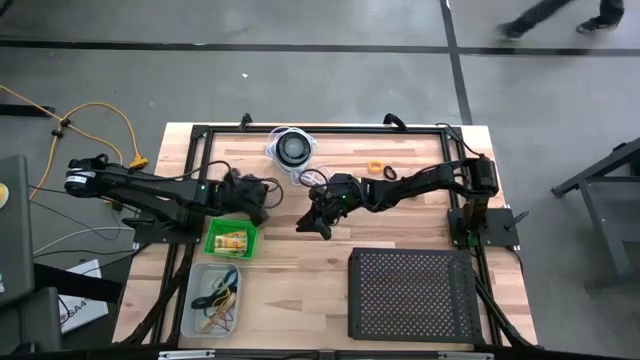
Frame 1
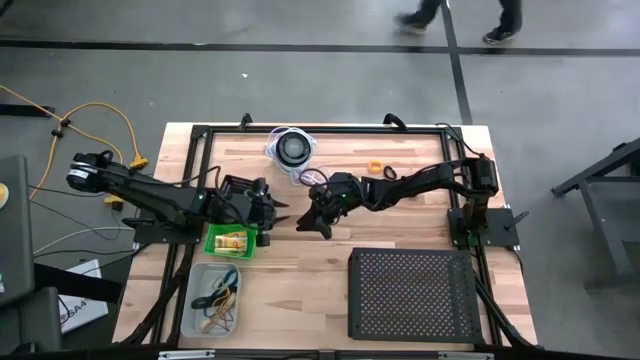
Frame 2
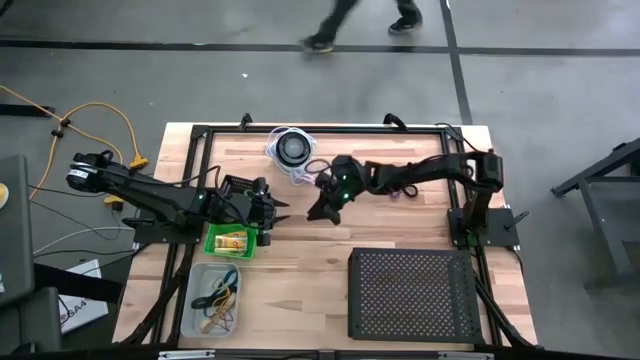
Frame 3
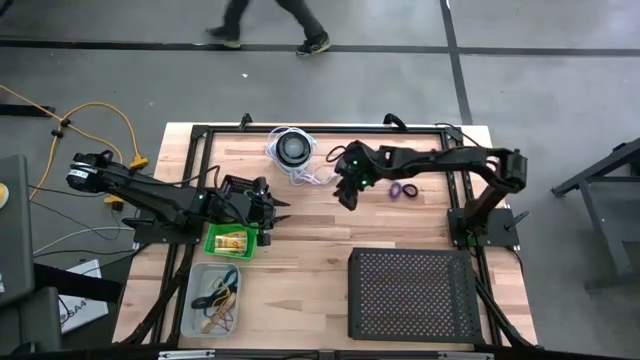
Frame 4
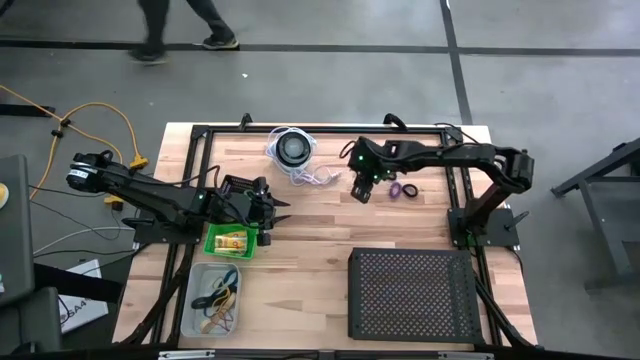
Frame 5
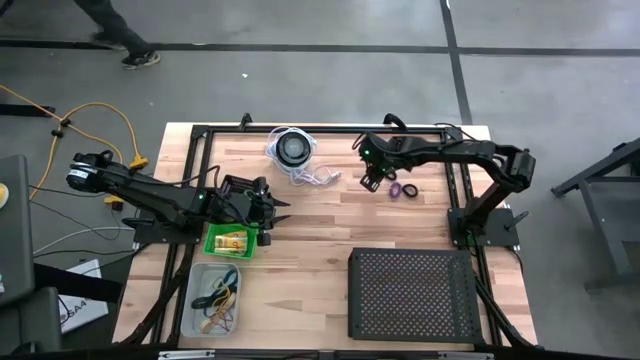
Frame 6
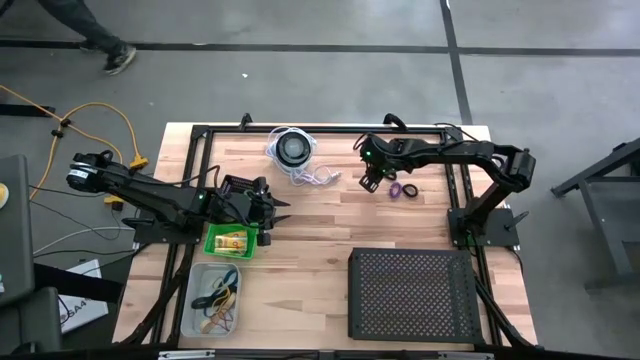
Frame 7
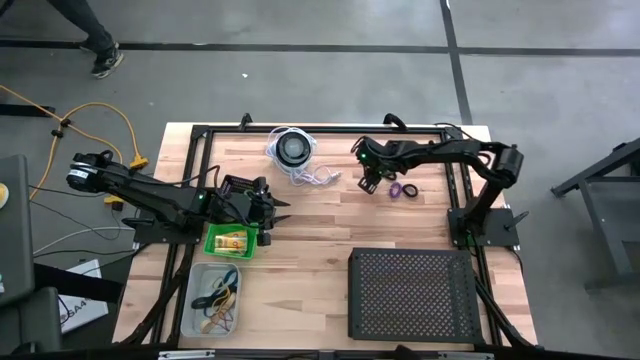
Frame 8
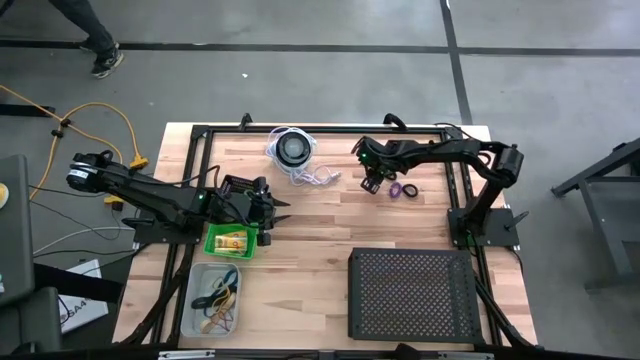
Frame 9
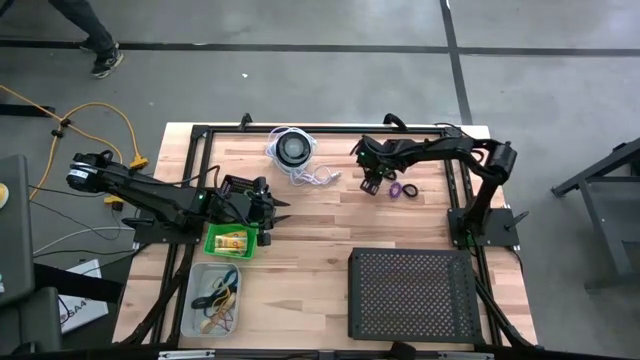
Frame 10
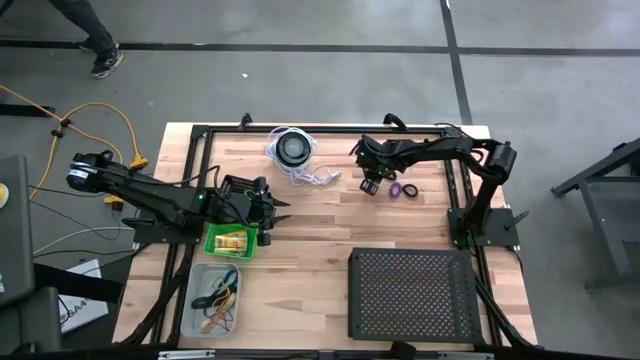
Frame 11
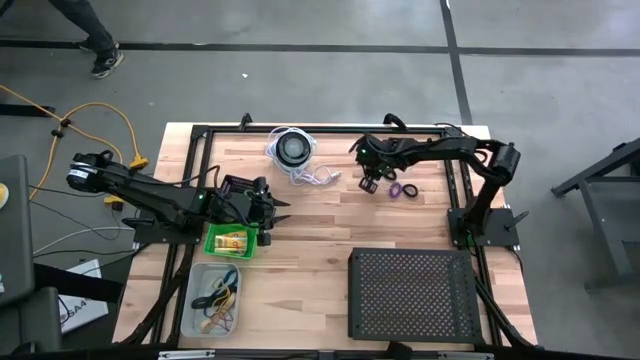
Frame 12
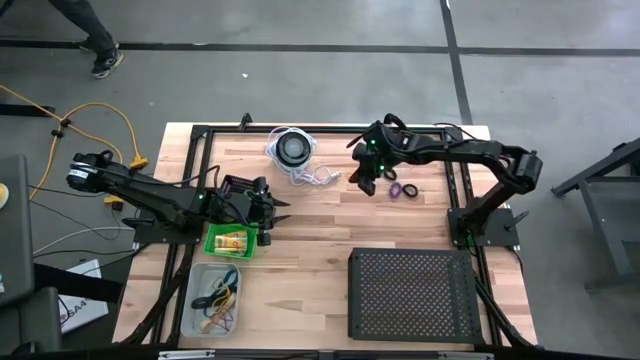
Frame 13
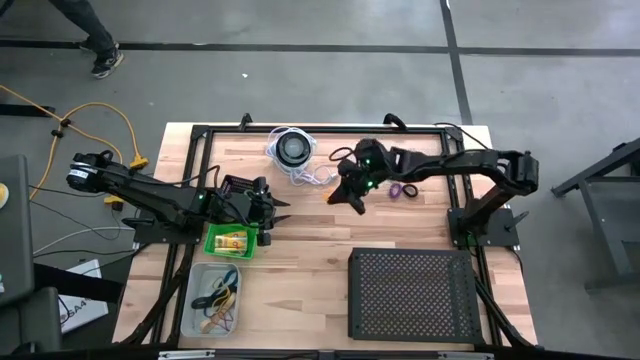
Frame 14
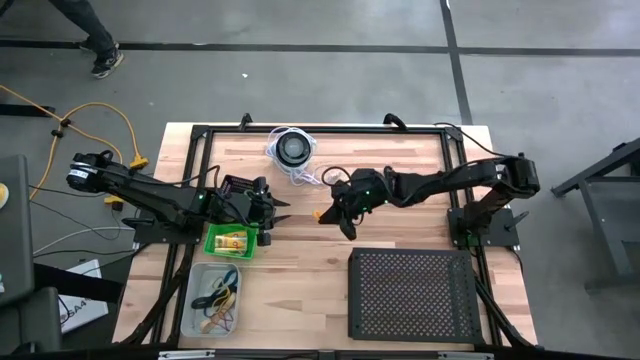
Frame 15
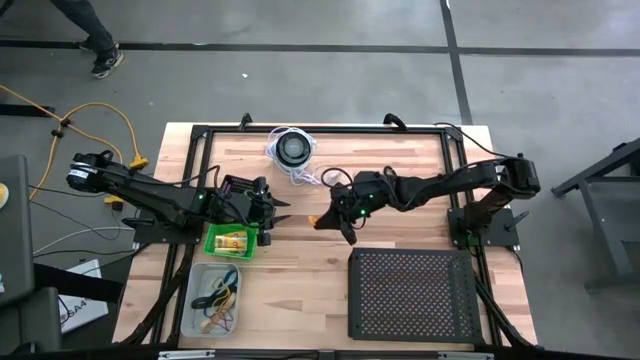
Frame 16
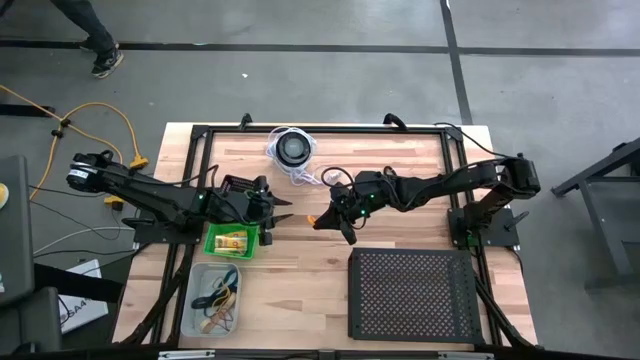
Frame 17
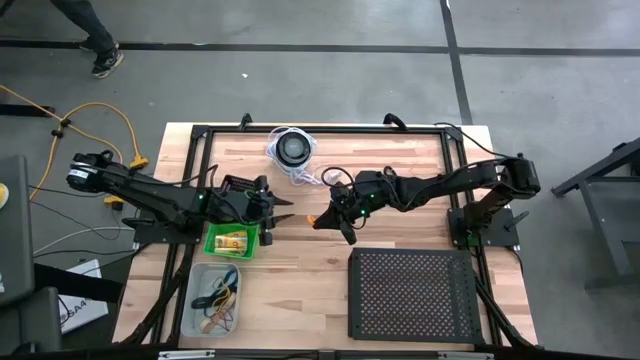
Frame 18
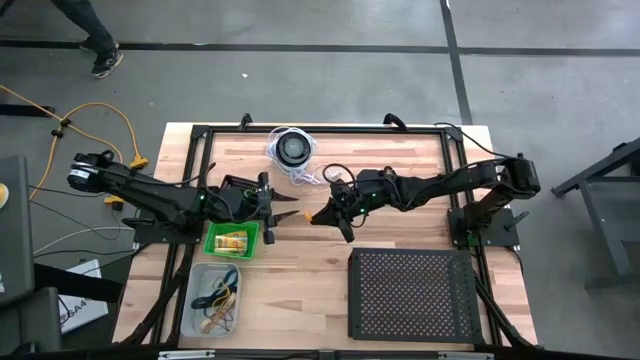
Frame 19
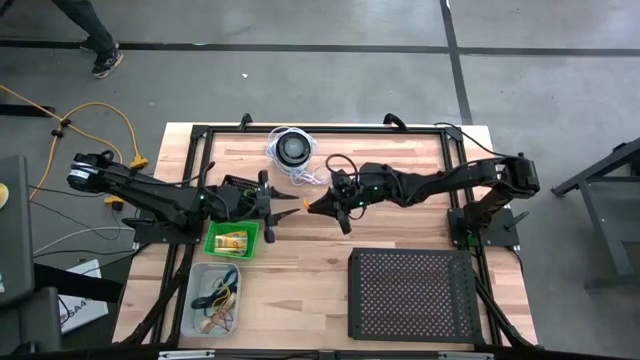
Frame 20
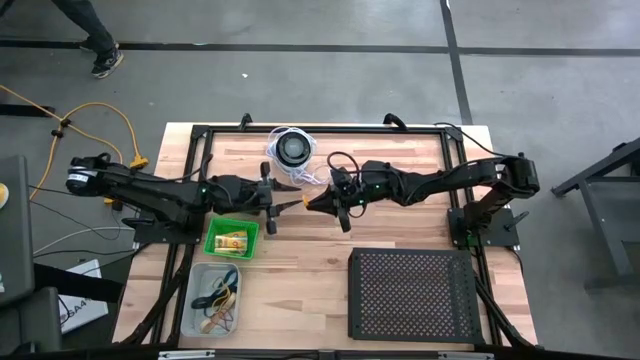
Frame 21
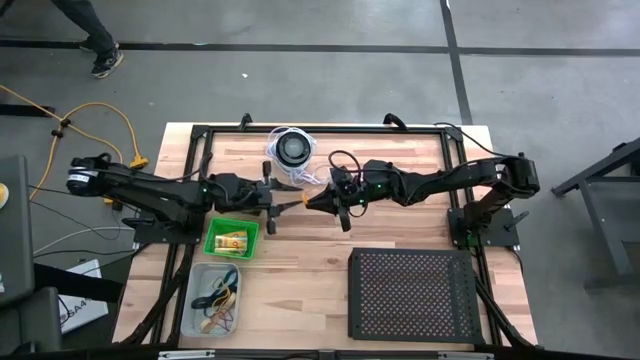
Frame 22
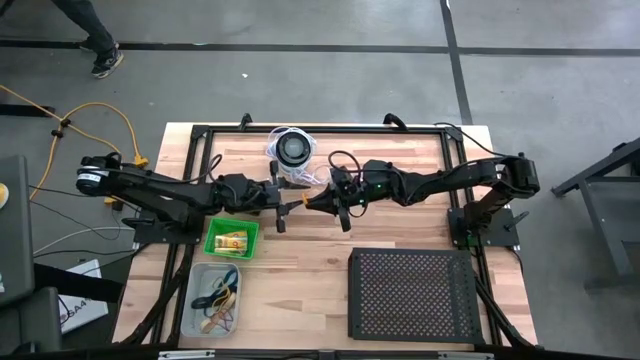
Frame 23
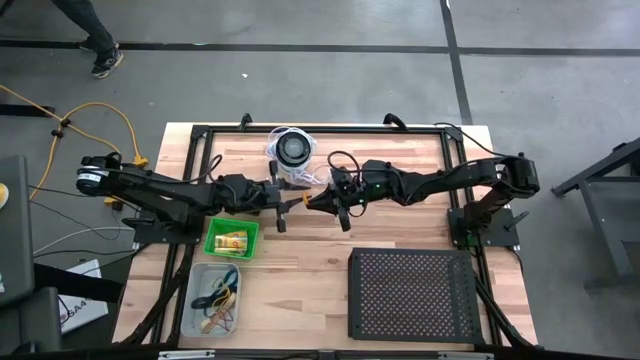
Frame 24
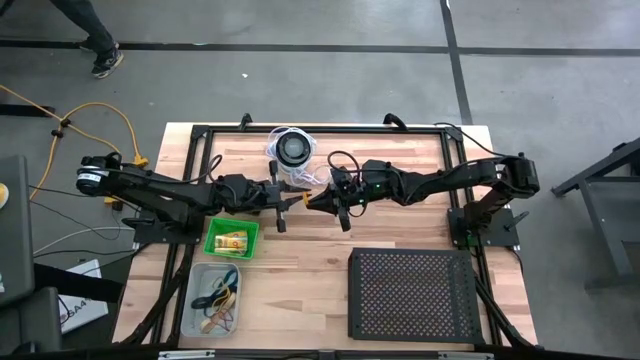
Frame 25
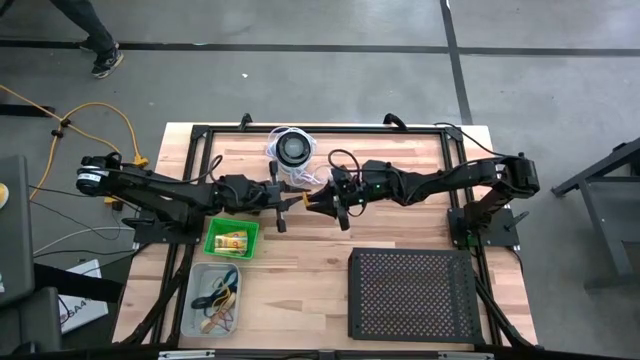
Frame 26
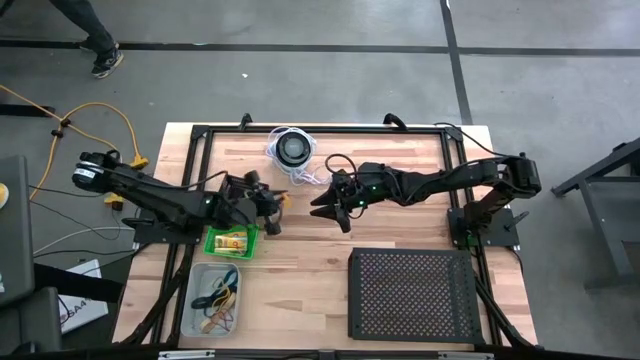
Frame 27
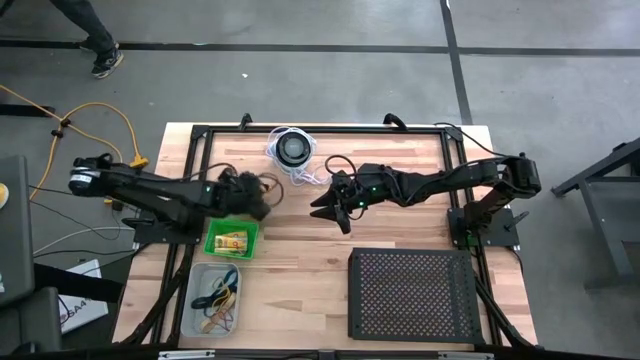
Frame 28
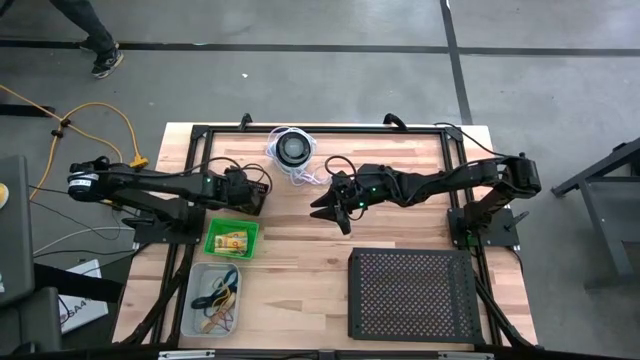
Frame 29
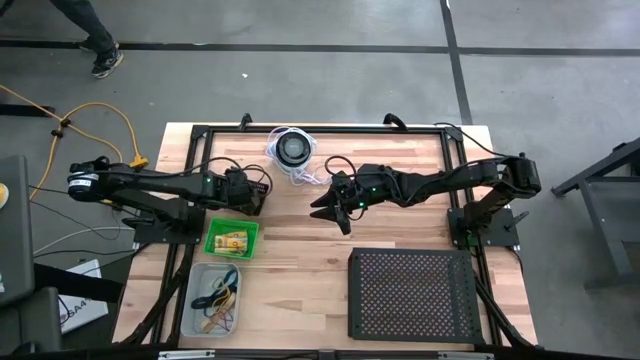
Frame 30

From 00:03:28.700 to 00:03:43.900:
Task: Pick & Place Office Desk Supplies
Put the yellow coil keychain into the black bin

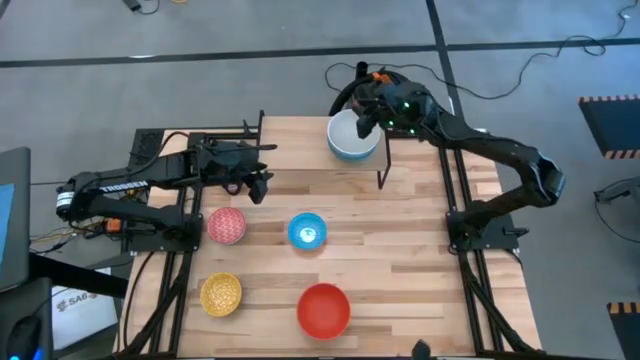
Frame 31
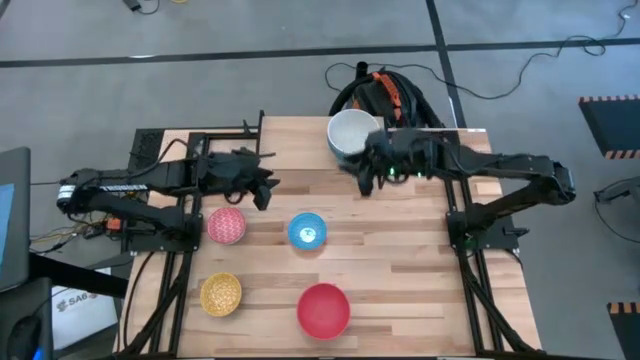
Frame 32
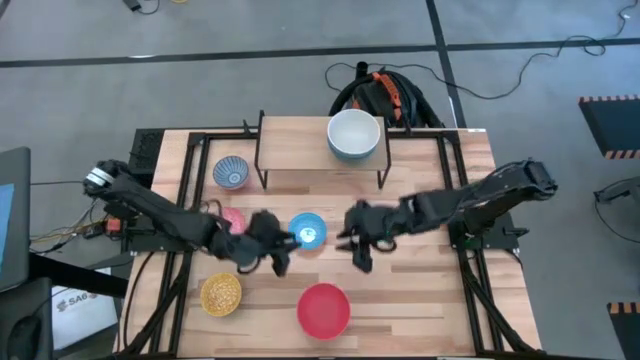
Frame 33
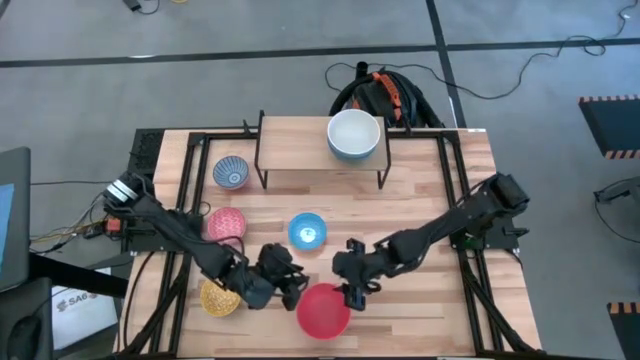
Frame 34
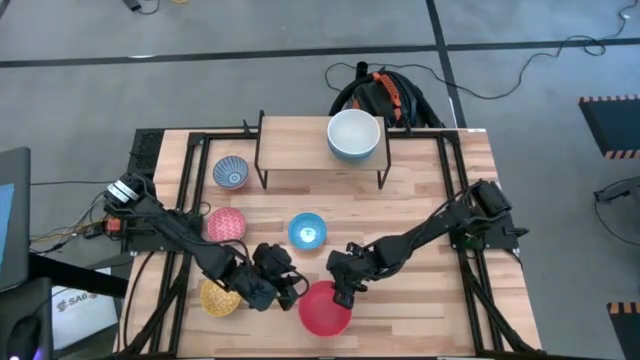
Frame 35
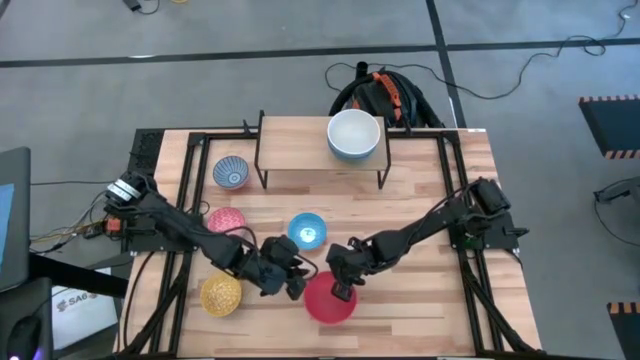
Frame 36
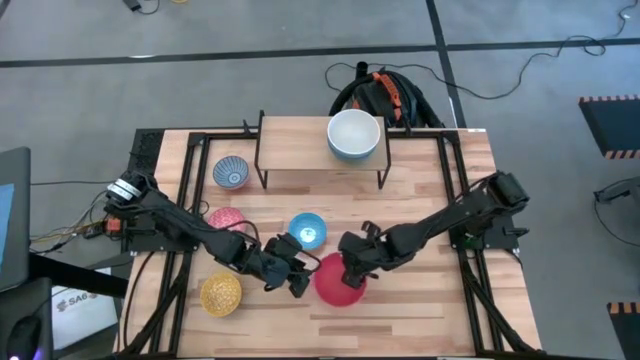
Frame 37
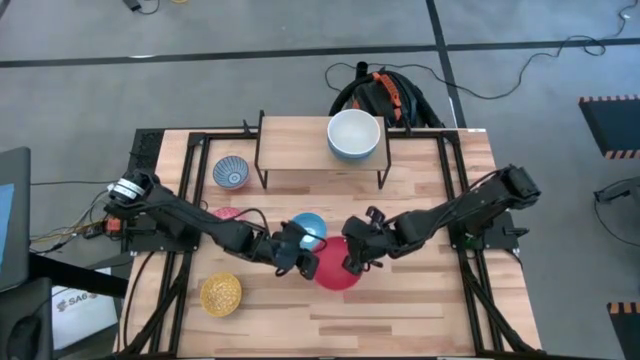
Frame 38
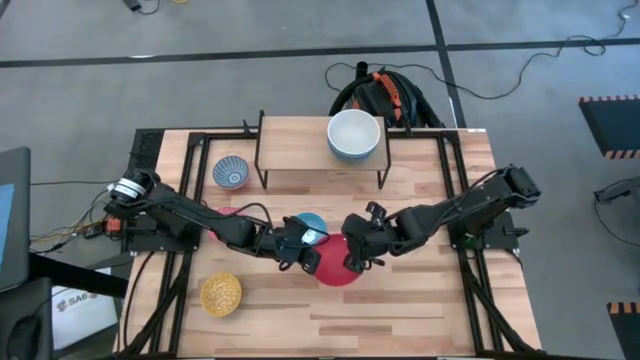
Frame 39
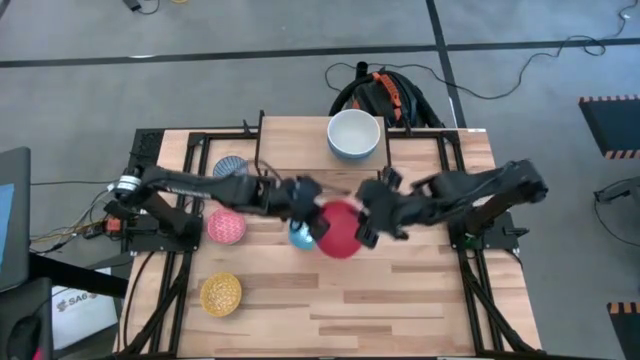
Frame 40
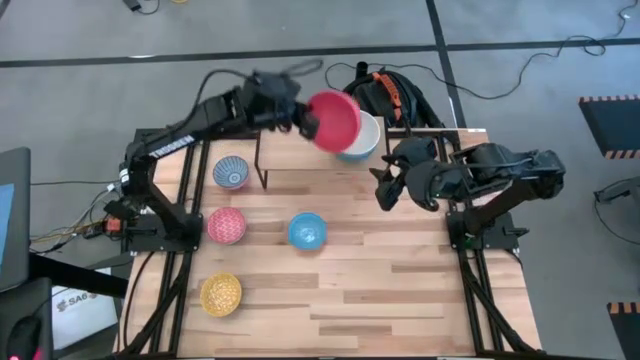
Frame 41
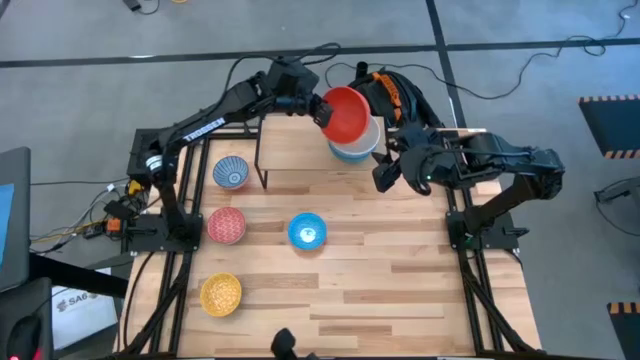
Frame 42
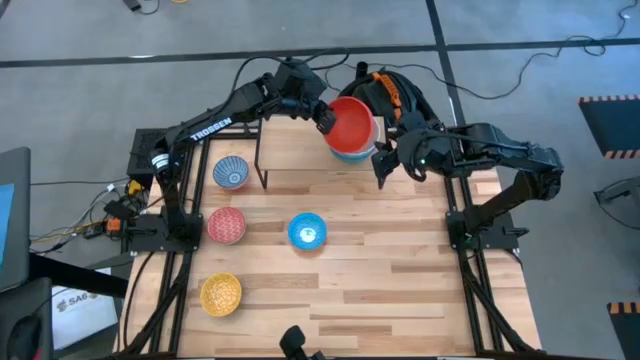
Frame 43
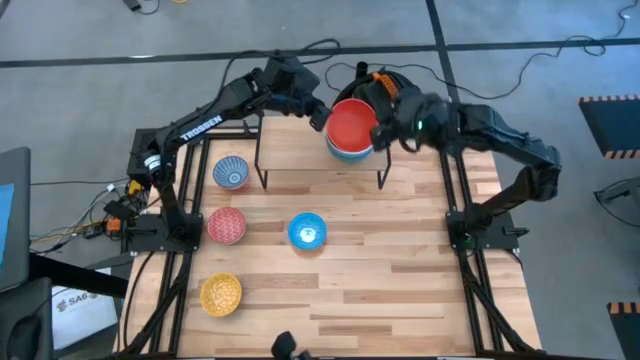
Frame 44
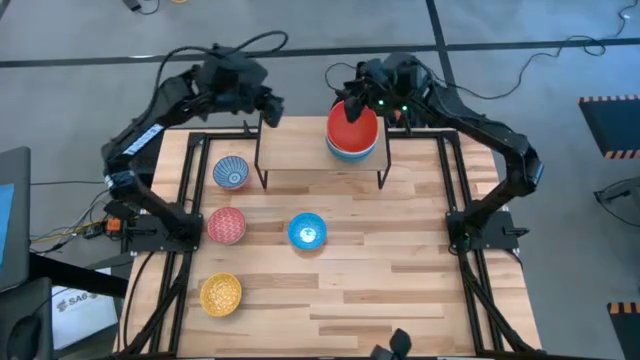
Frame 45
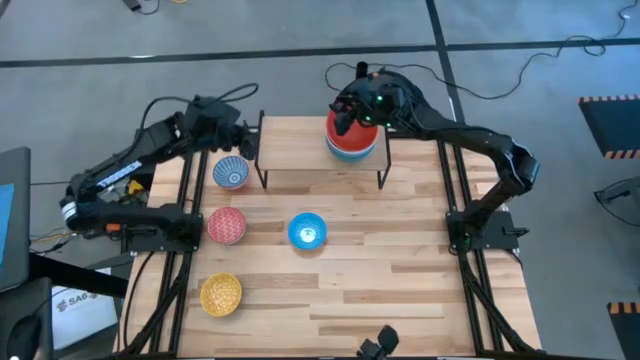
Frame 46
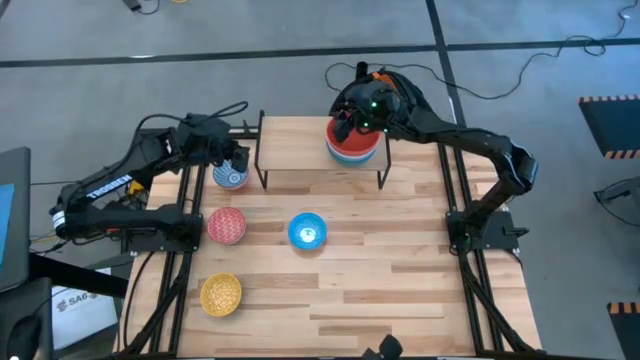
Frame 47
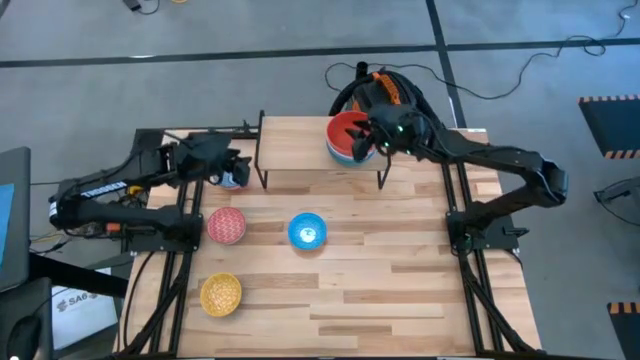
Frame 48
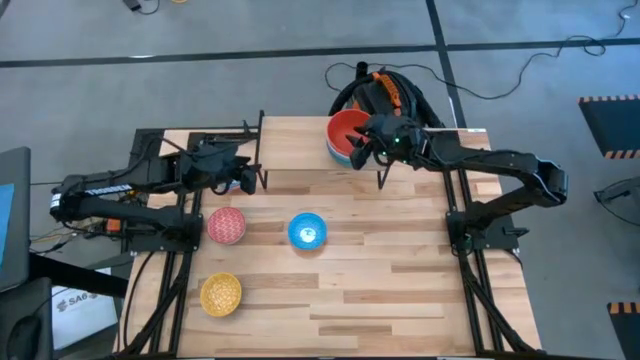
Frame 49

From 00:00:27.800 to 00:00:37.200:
Task: Place and stack bowls onto a shelf
Stack the orange bowl on top of the white bowl on the shelf
